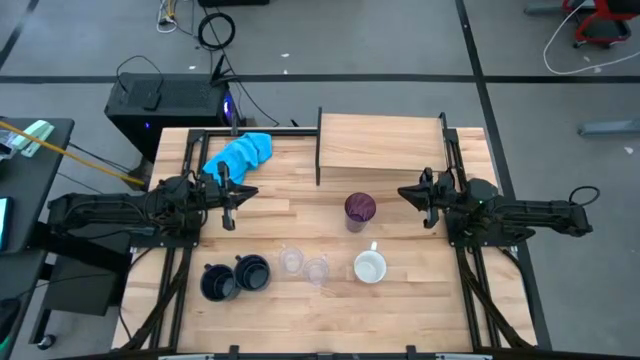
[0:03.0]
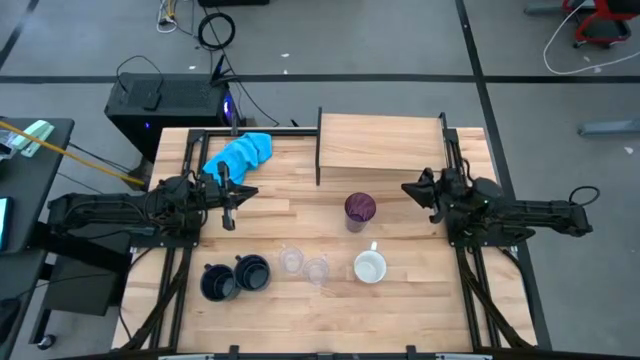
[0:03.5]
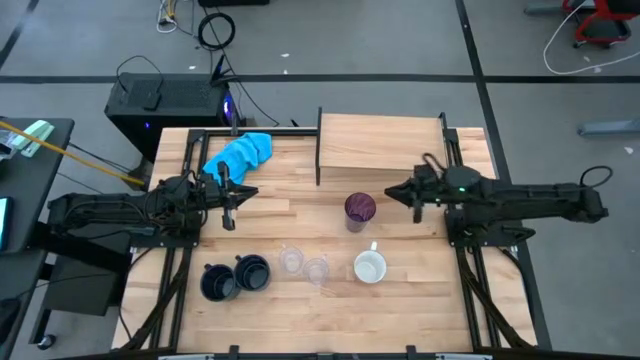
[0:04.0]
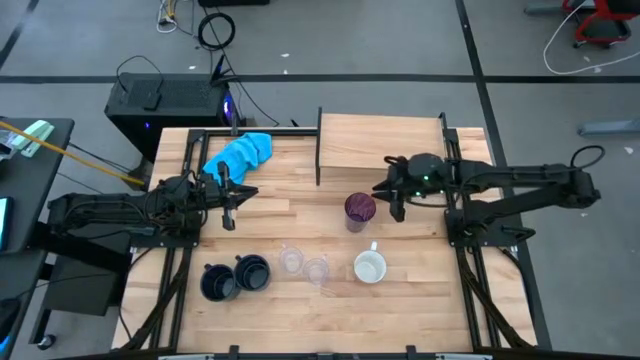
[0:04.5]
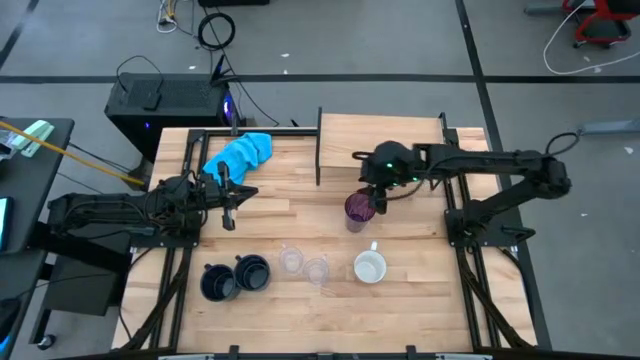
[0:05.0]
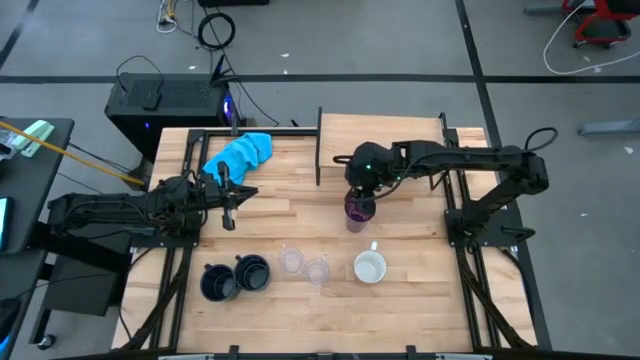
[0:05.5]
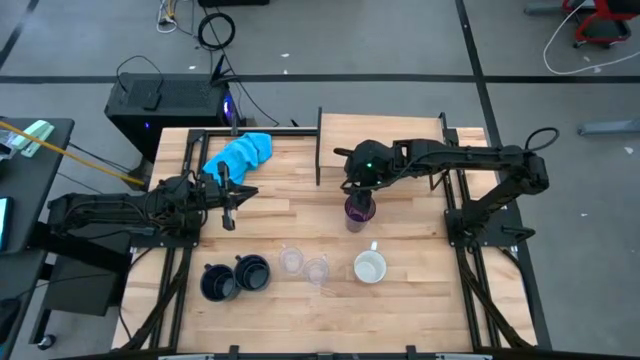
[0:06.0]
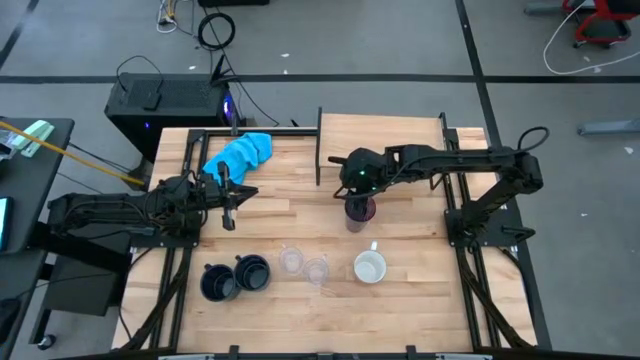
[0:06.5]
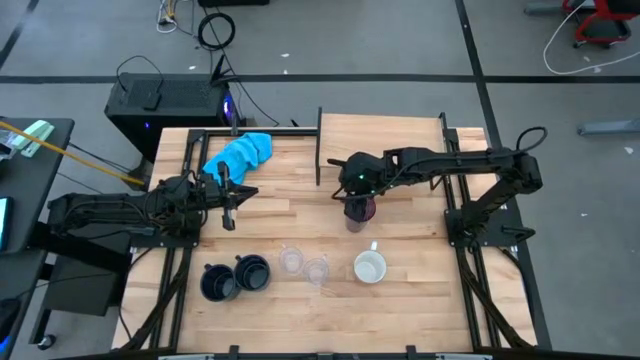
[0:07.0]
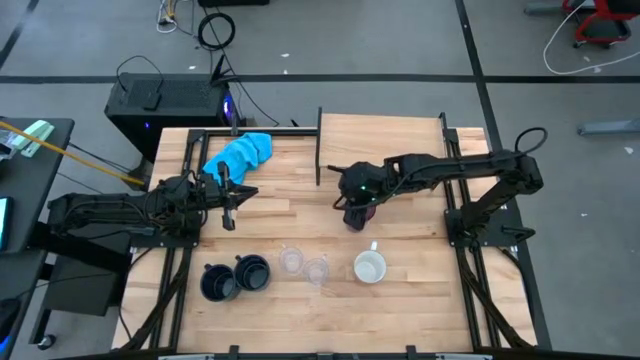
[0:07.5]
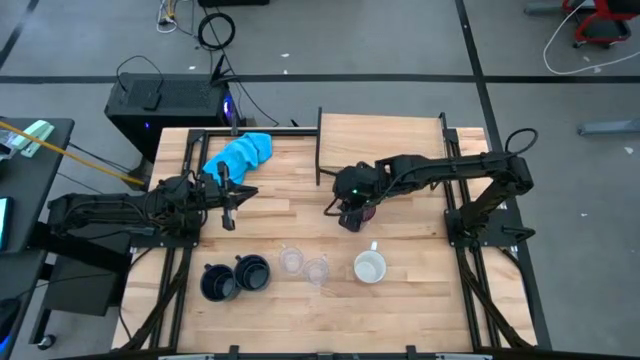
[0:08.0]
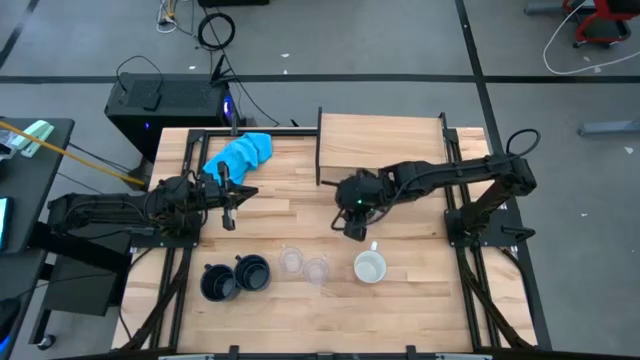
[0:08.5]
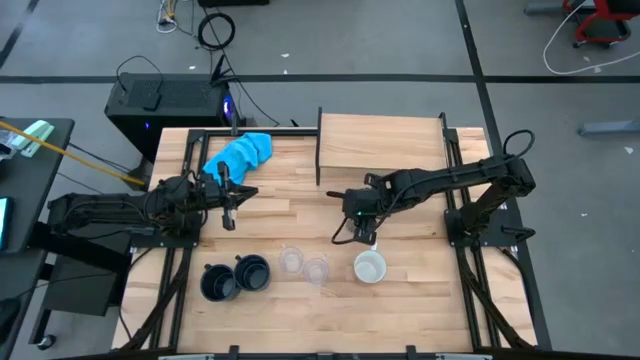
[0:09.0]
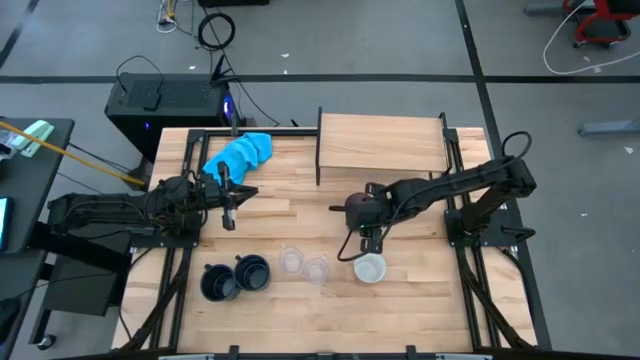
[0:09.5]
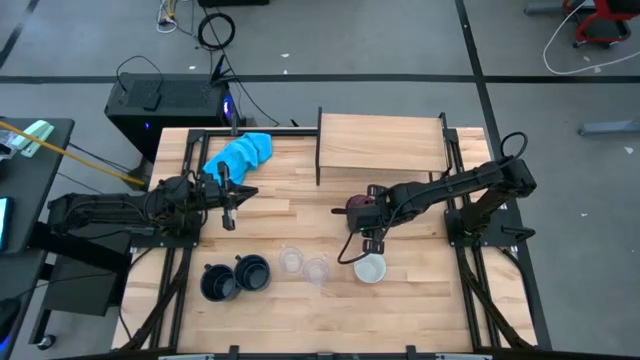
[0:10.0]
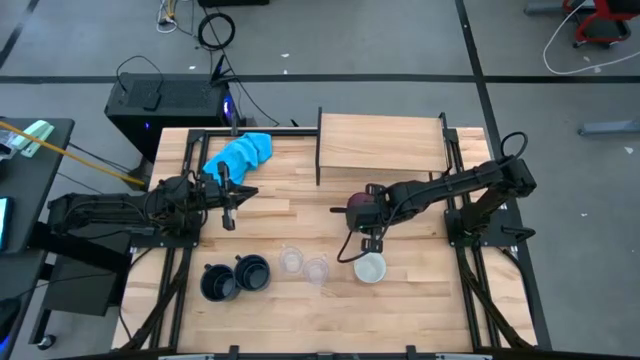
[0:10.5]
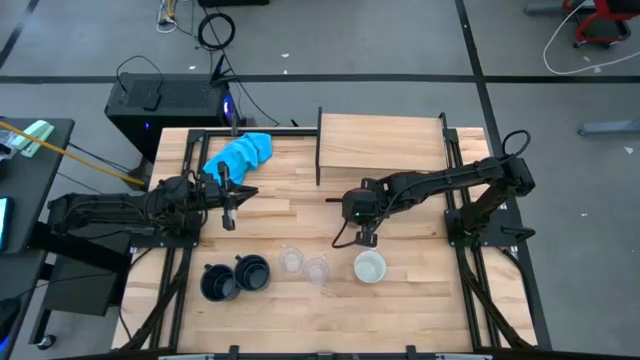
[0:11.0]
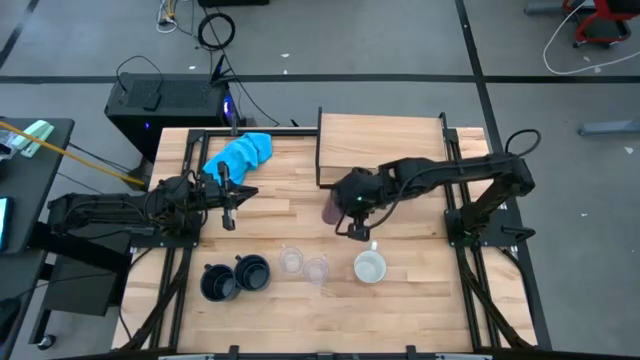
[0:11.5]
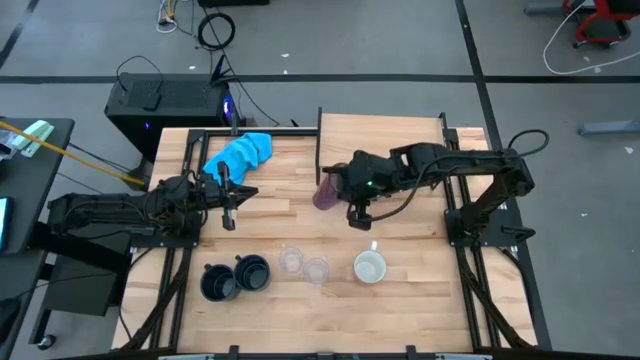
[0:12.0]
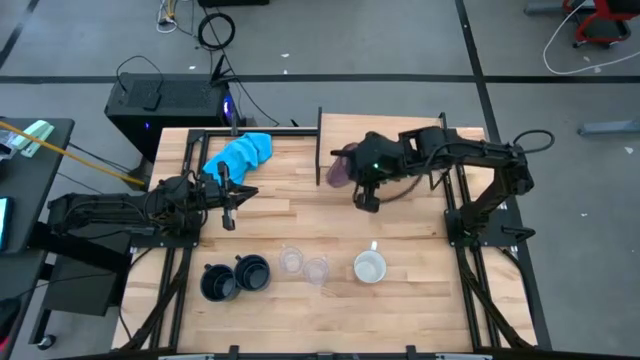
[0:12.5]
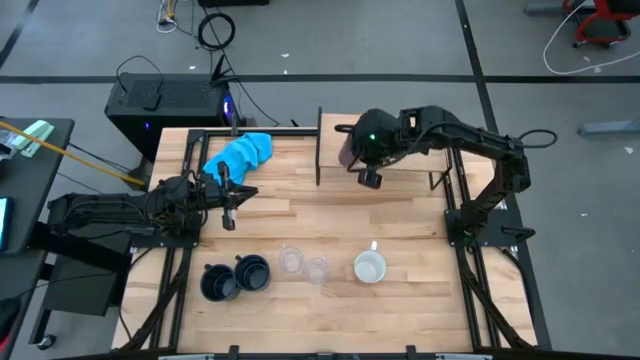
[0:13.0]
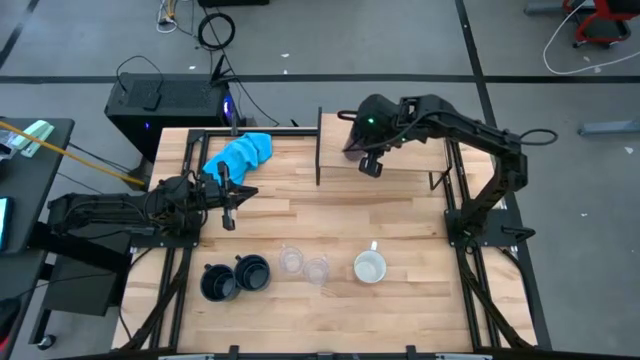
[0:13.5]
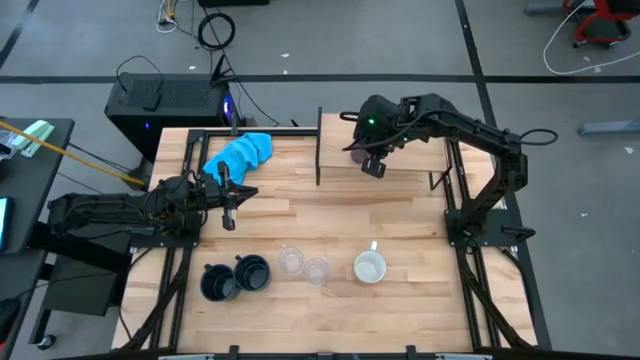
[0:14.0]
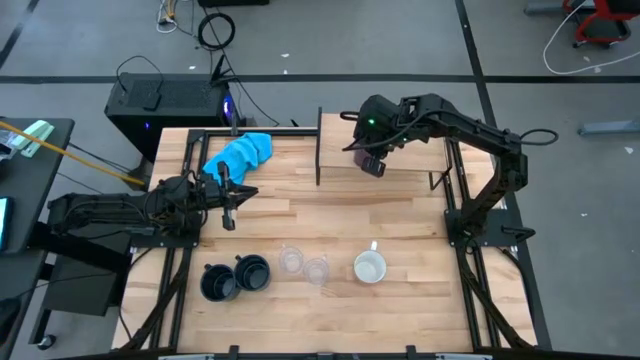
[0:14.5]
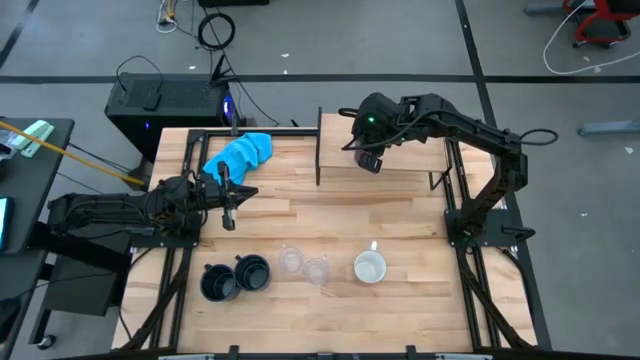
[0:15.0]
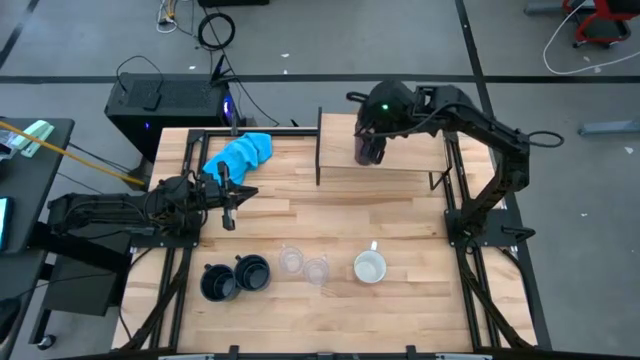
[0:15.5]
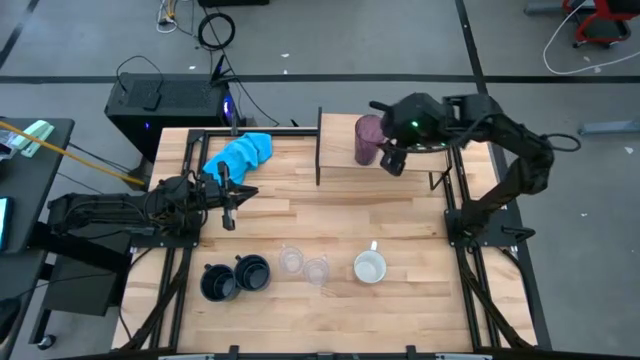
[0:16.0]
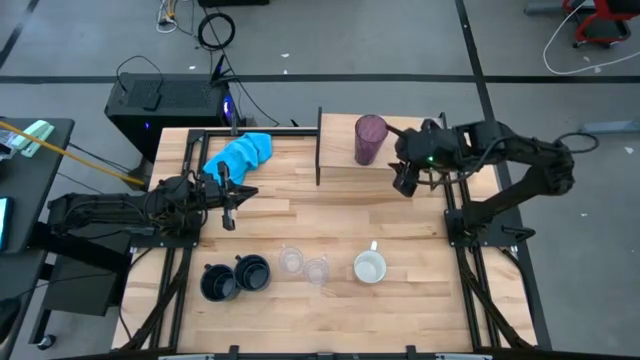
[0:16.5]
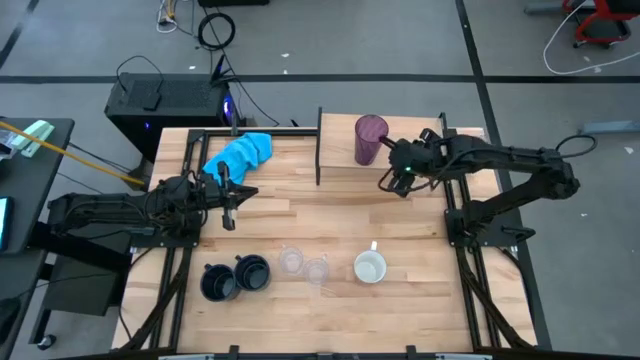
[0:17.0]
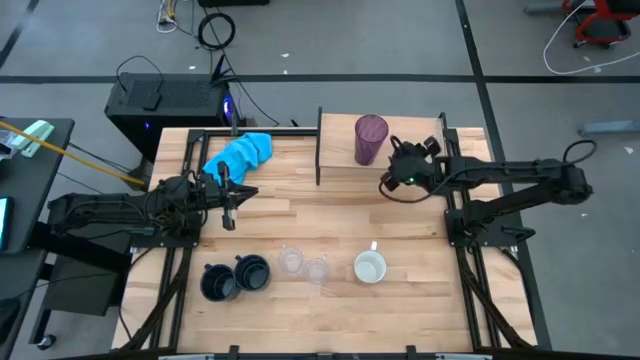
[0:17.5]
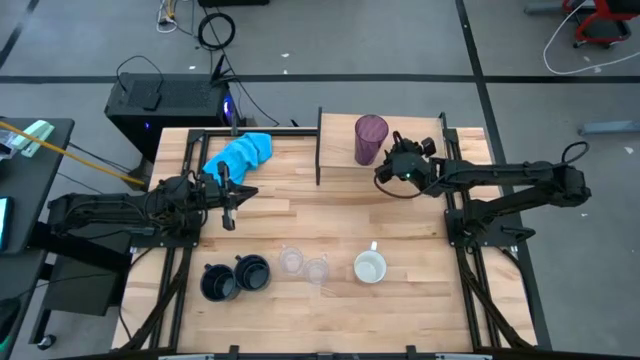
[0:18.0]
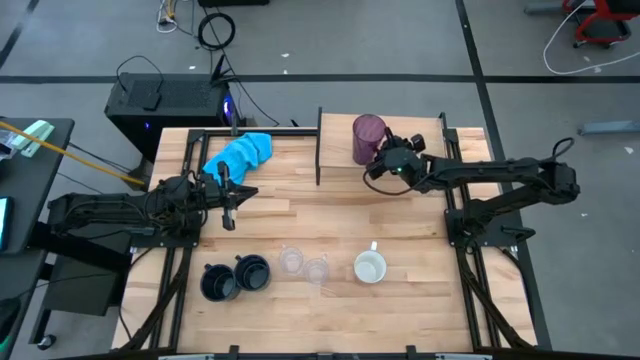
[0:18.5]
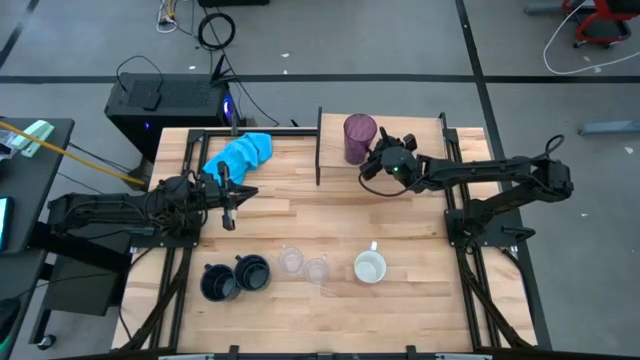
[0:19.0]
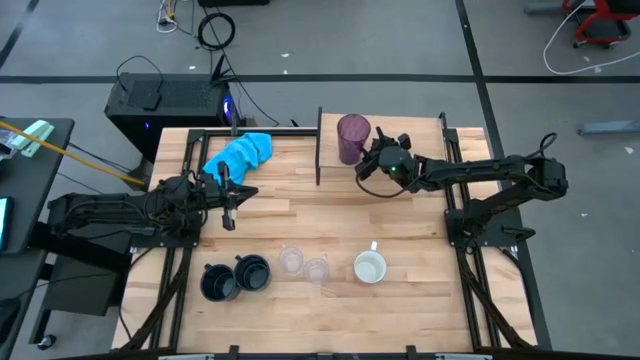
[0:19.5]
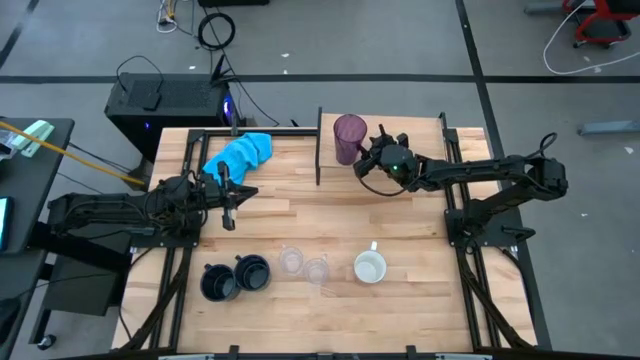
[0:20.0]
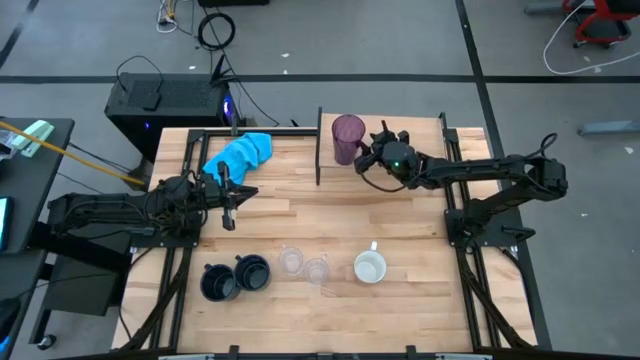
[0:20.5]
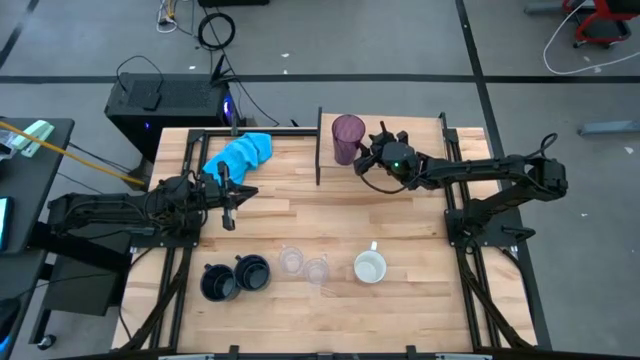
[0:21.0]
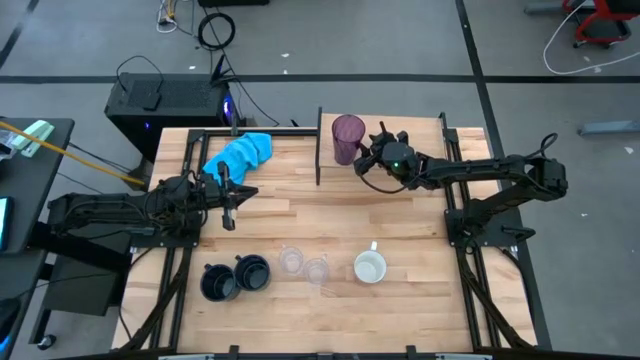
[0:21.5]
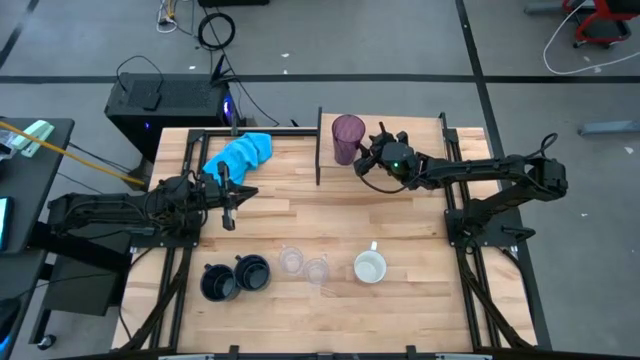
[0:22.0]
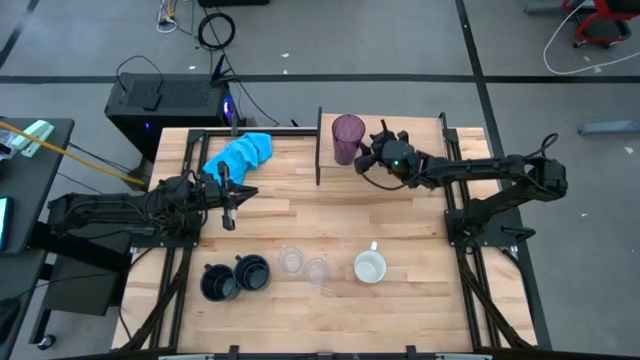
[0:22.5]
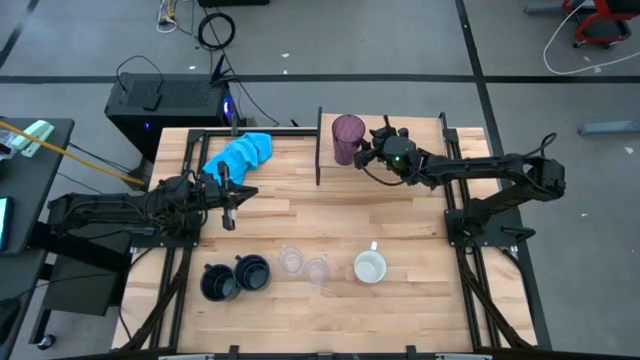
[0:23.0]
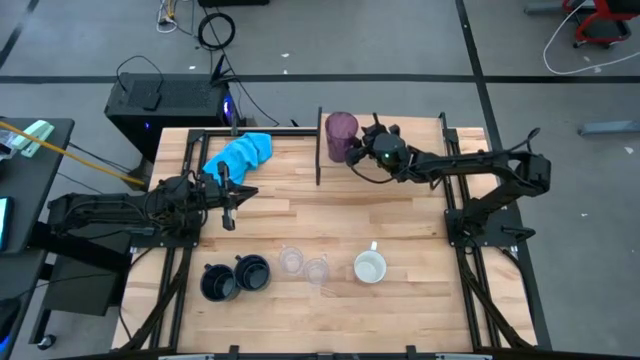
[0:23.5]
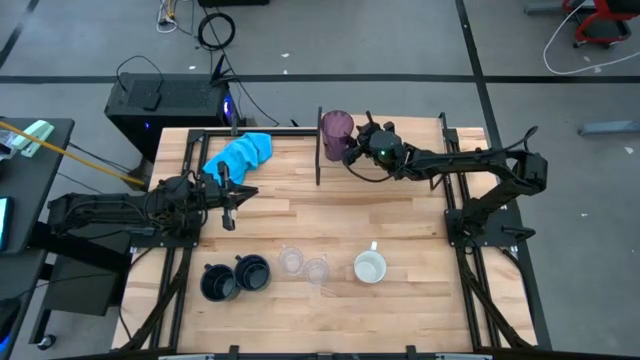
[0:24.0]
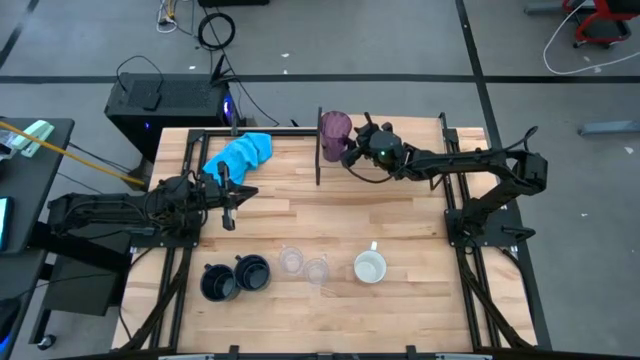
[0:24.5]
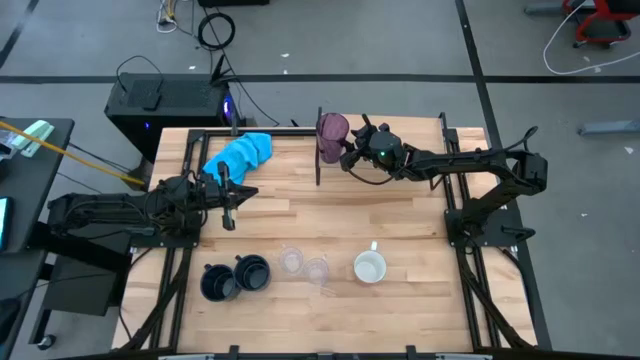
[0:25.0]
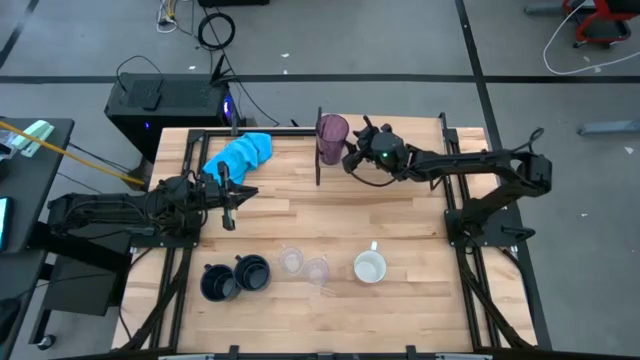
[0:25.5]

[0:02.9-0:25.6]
Task: Stack small to large cups/mugs on shelf
Put the purple cup on the shelf
